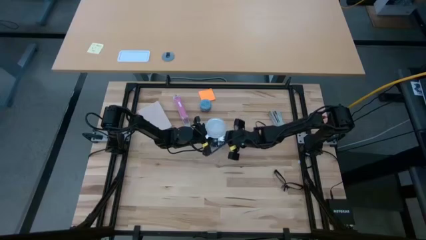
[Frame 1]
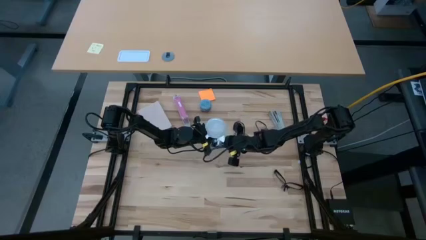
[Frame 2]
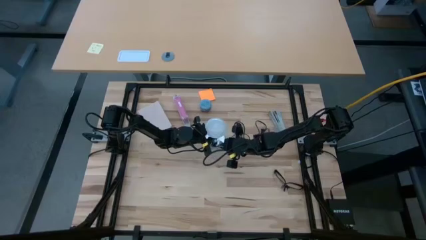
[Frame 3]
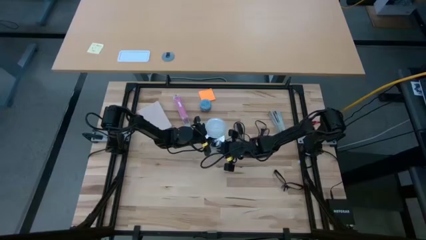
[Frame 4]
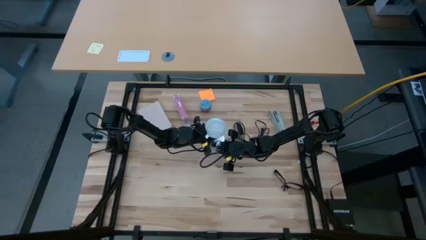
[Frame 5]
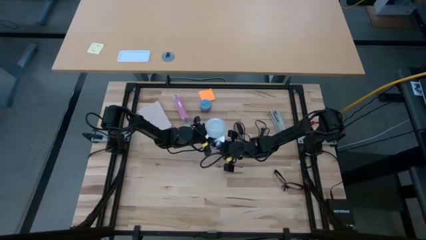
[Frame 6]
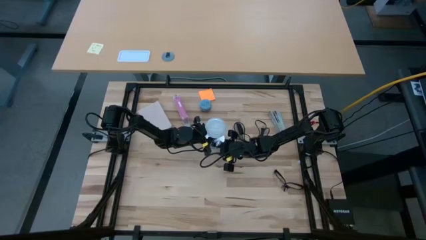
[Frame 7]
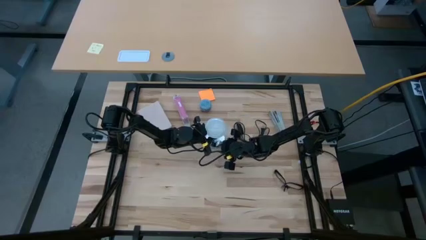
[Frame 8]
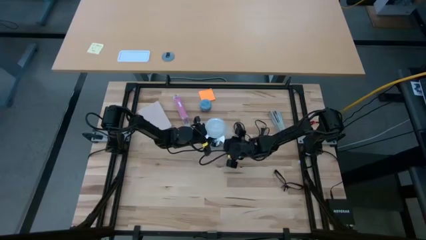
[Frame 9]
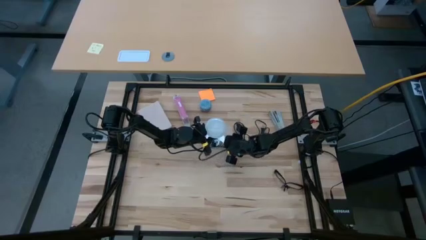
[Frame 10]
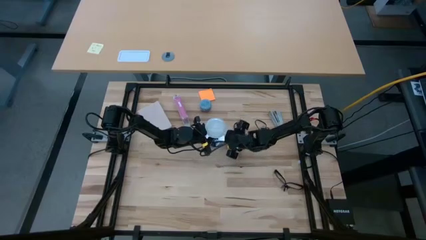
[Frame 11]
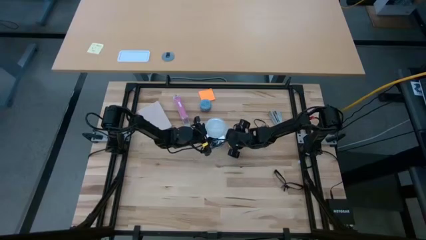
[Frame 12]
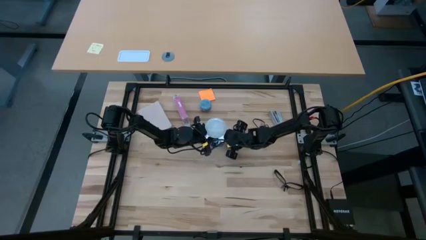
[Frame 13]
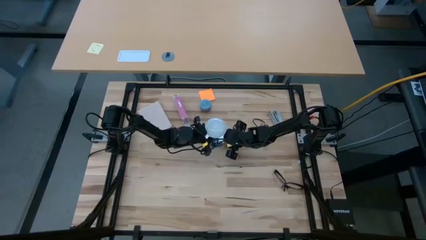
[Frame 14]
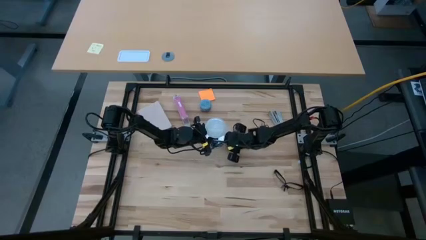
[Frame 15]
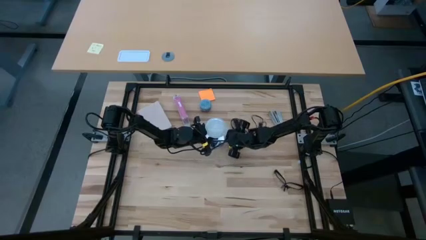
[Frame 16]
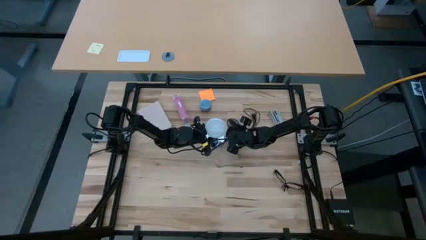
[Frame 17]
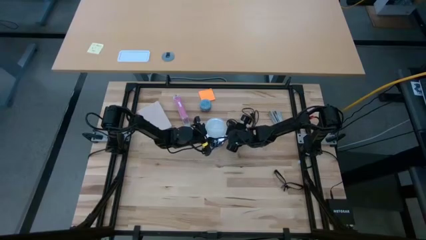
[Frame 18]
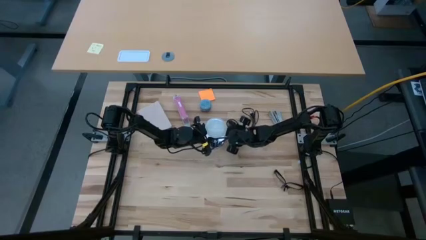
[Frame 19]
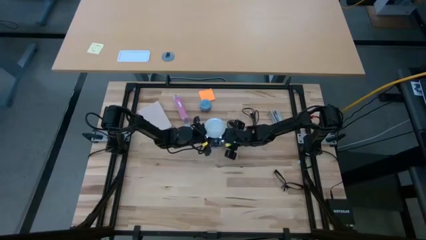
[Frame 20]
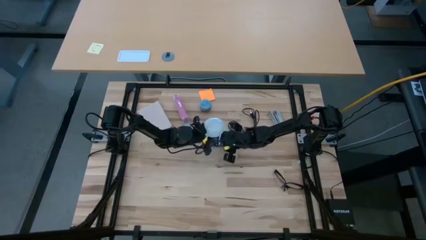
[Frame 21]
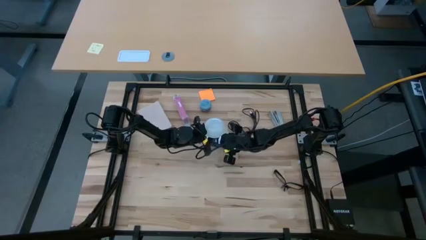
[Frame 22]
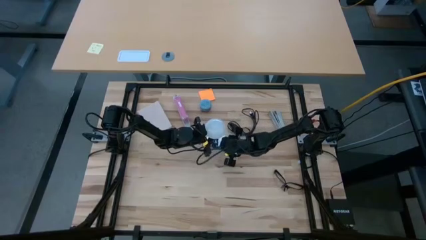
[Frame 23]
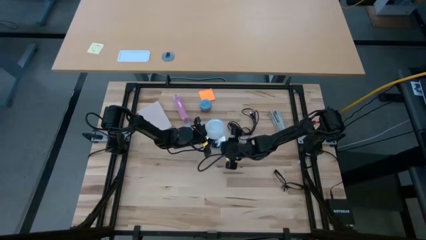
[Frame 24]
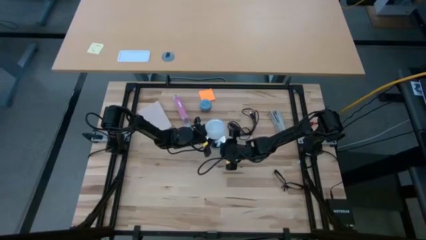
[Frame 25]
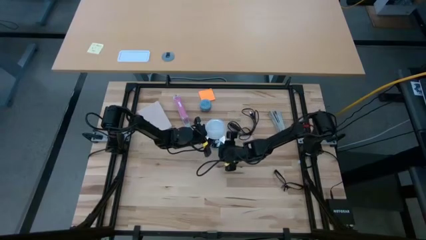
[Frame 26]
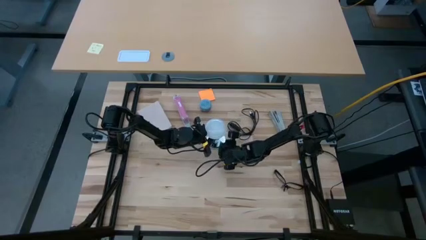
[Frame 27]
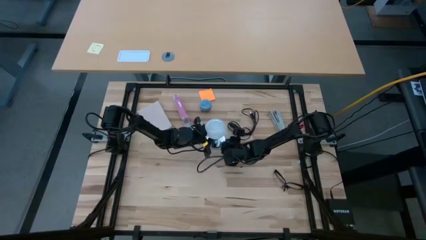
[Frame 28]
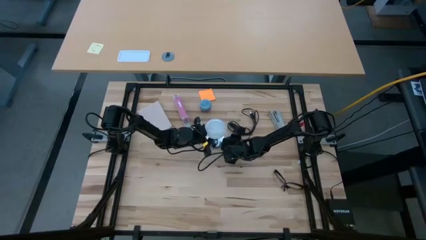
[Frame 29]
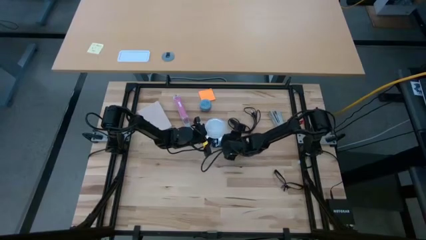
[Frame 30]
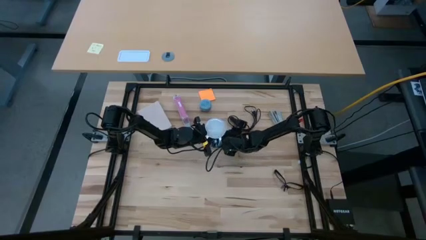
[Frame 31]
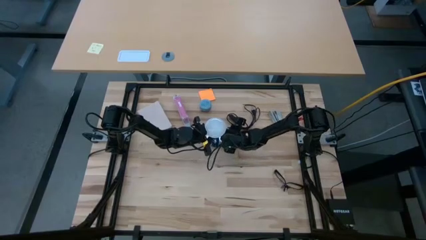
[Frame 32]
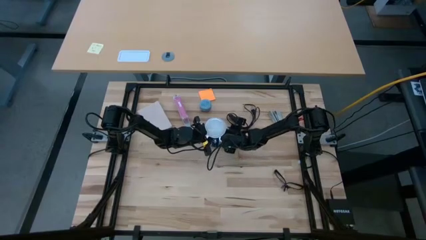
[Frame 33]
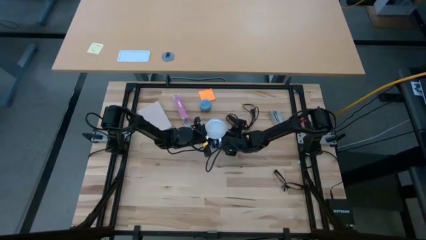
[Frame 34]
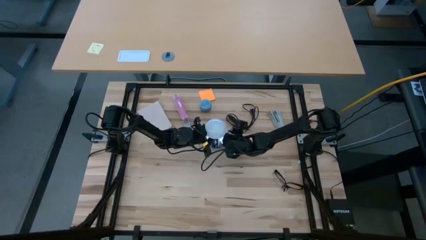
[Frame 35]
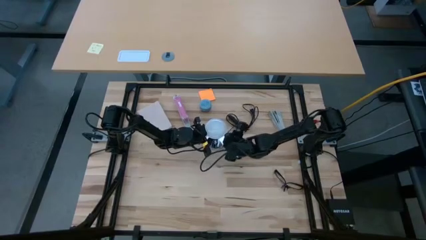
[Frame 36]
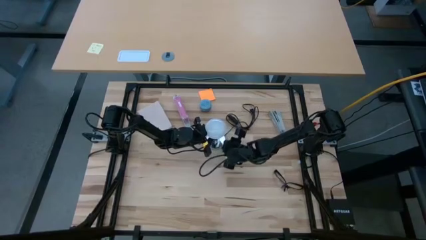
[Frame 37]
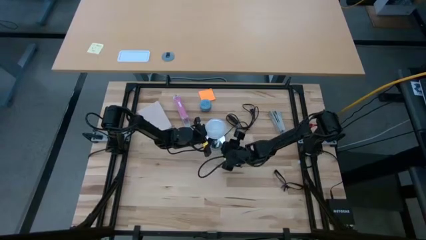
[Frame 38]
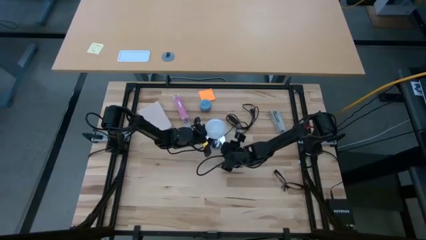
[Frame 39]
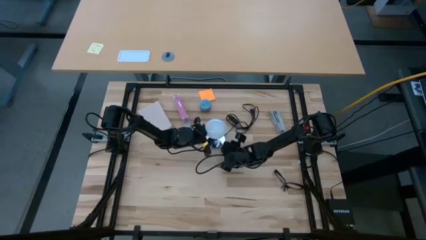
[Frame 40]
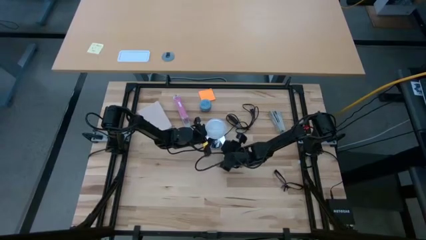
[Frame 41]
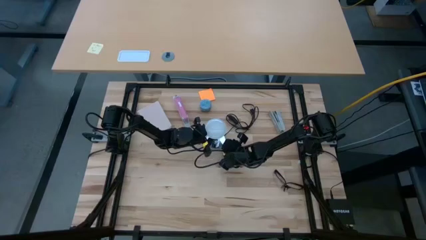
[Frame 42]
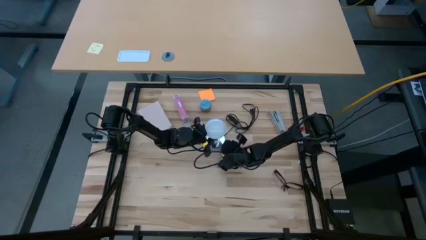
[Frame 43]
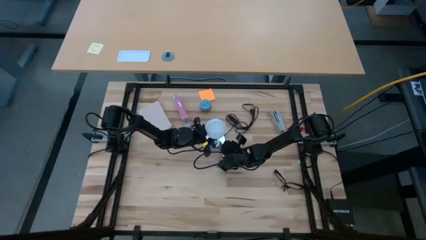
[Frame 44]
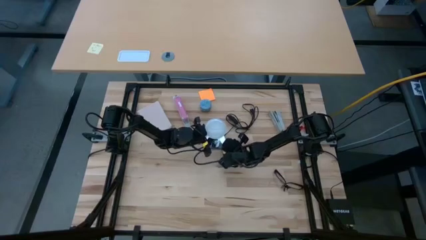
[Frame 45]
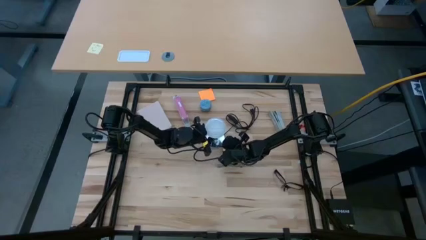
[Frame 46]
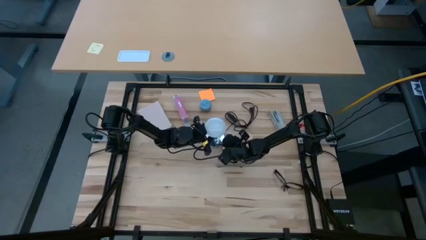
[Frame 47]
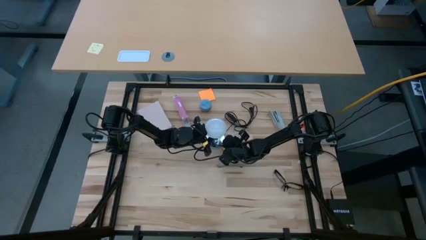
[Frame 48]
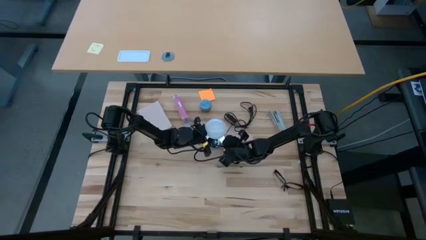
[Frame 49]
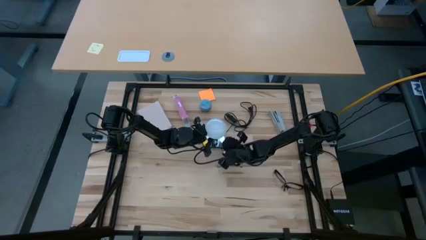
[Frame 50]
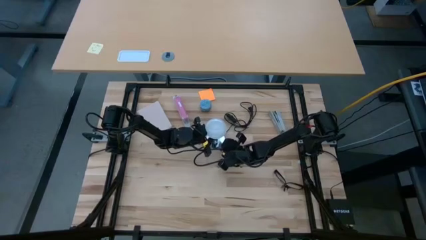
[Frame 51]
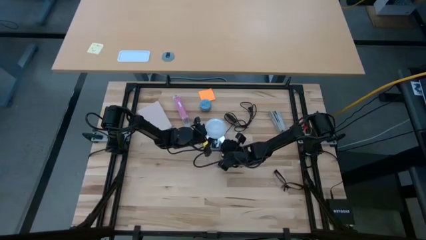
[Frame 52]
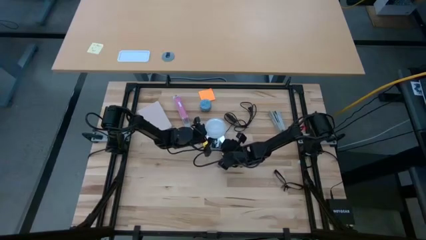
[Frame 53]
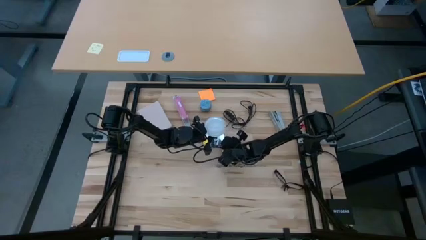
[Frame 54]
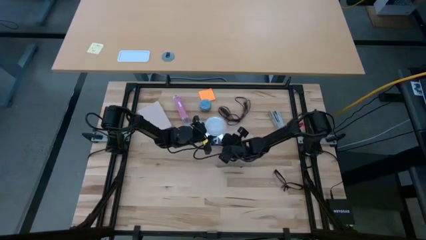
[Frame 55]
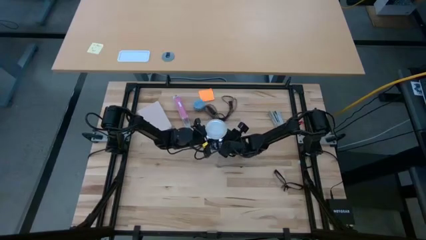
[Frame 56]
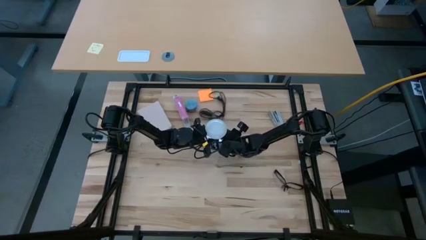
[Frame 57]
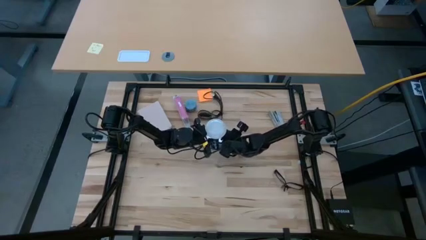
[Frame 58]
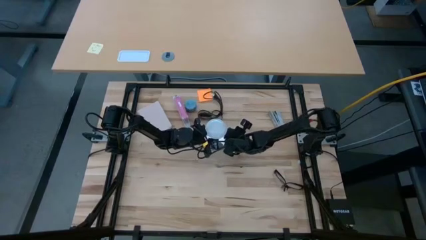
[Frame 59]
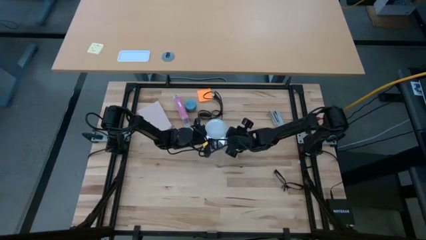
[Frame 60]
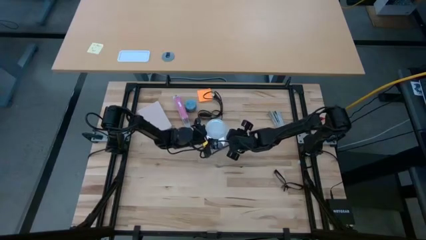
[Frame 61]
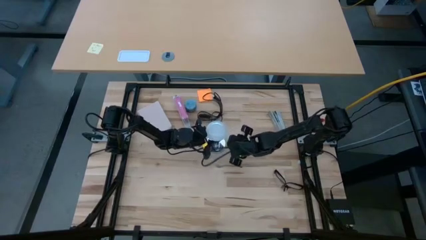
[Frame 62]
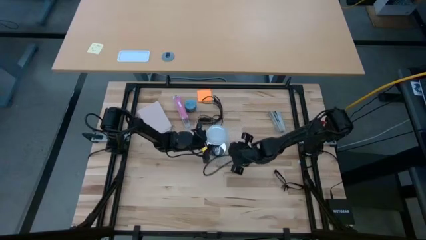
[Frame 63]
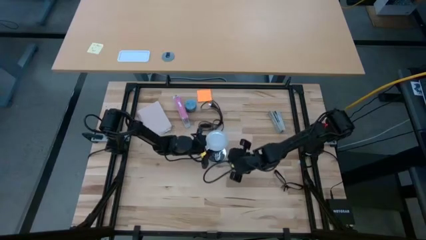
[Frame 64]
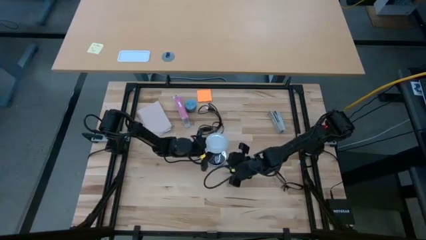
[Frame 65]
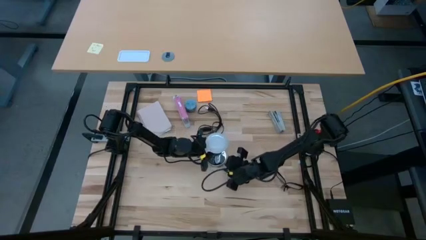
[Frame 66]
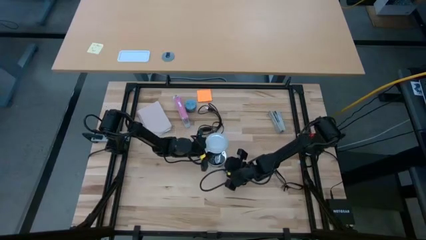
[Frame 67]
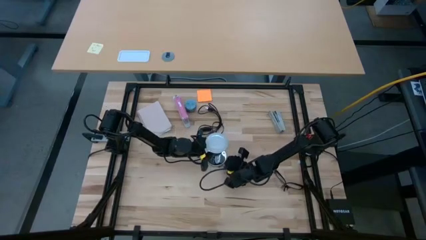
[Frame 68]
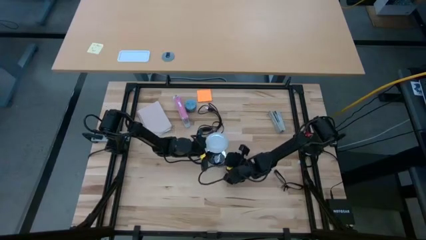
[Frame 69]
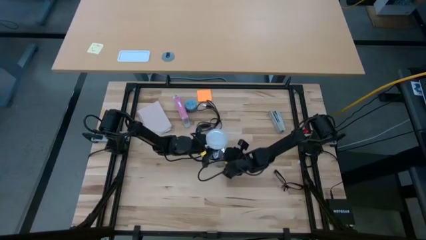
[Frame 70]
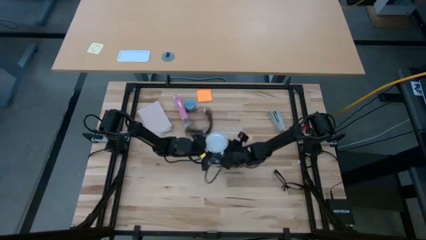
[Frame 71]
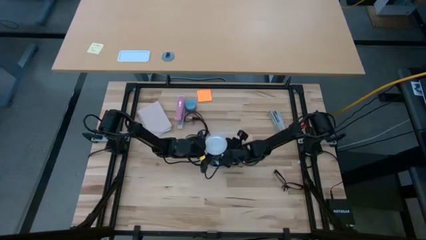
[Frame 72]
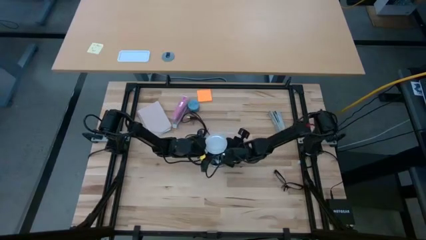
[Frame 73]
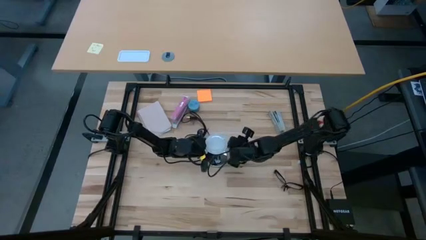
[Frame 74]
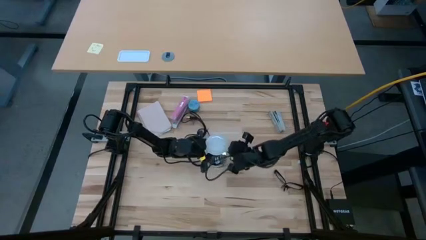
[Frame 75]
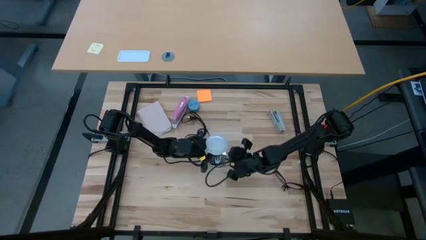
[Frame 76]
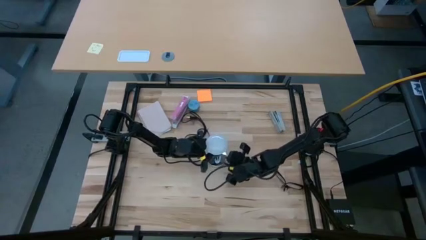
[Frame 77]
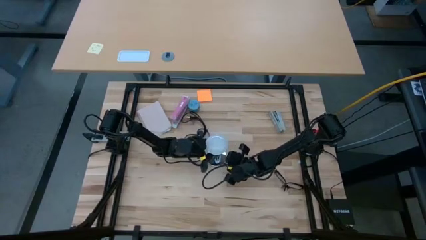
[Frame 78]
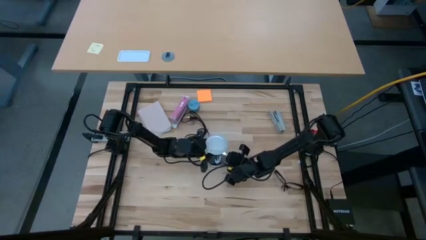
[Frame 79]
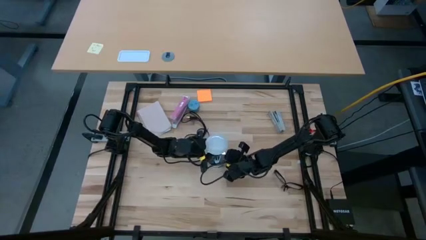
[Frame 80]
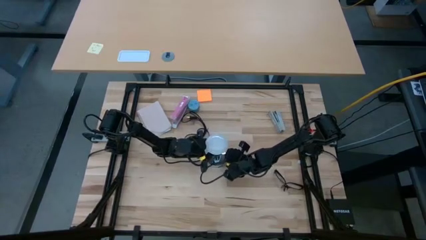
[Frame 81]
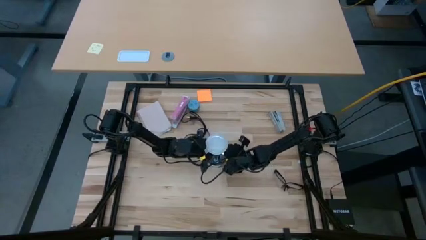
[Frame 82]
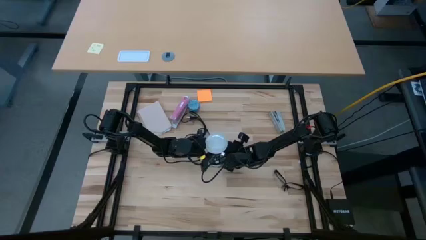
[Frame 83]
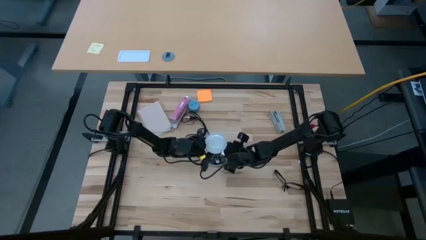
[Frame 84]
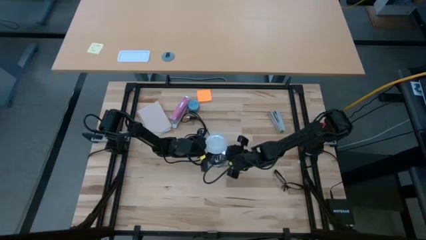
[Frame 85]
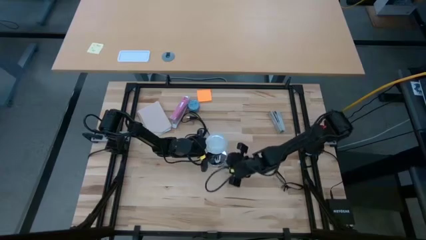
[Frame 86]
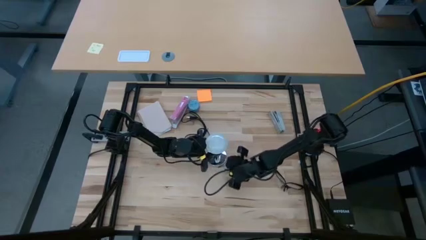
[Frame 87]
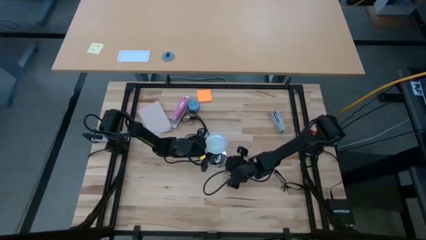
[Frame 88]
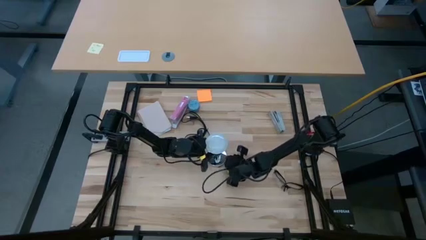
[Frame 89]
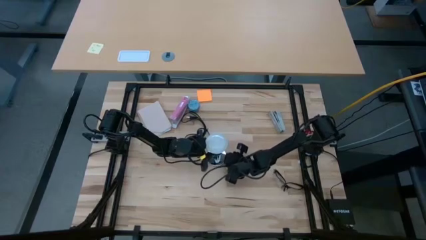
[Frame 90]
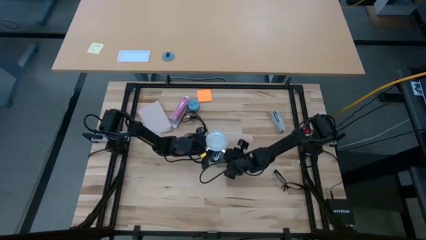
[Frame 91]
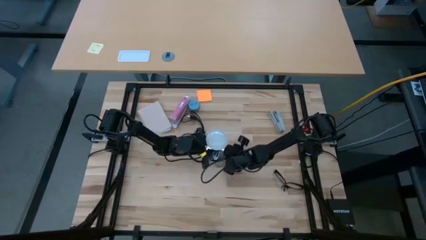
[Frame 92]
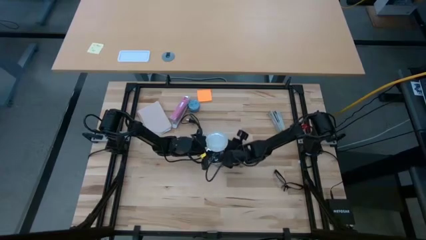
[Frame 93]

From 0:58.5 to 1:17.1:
Task: Screw lightbulb
Insert the lightbulb into the lamp
